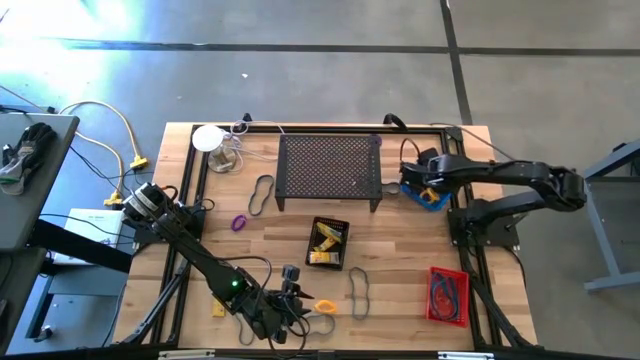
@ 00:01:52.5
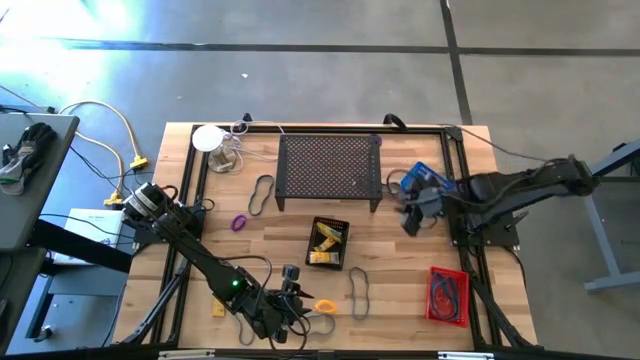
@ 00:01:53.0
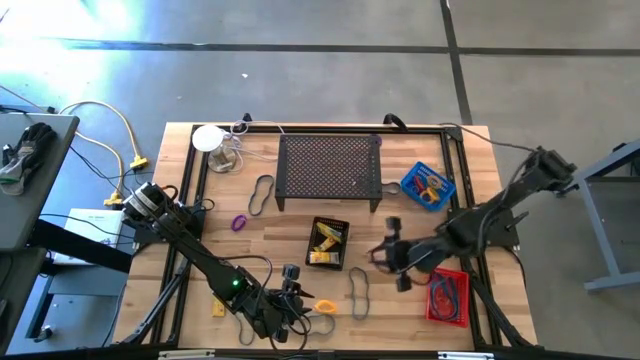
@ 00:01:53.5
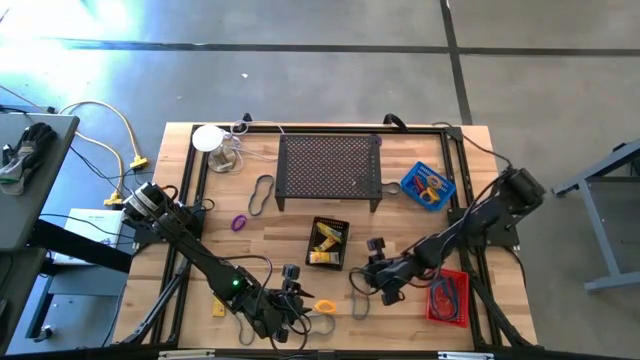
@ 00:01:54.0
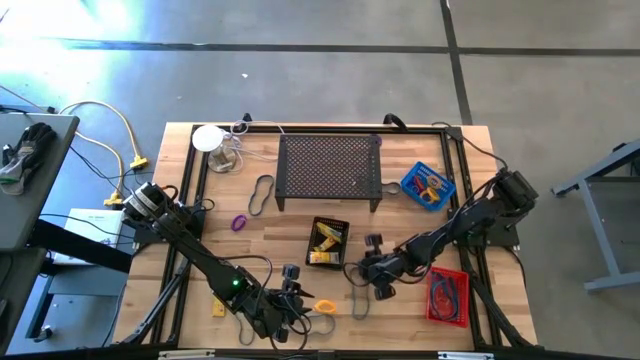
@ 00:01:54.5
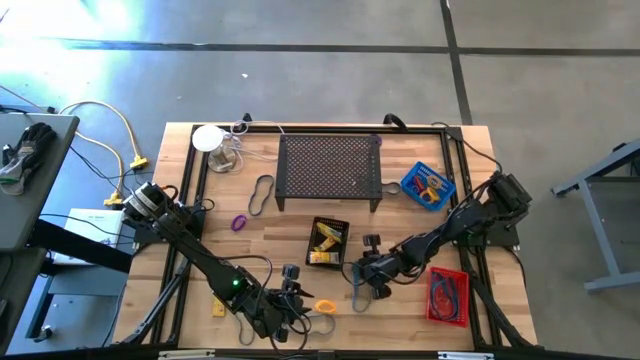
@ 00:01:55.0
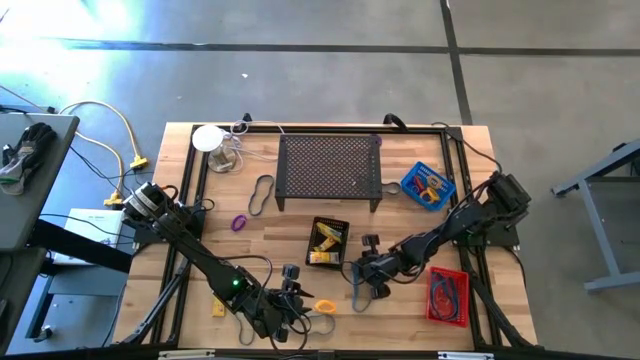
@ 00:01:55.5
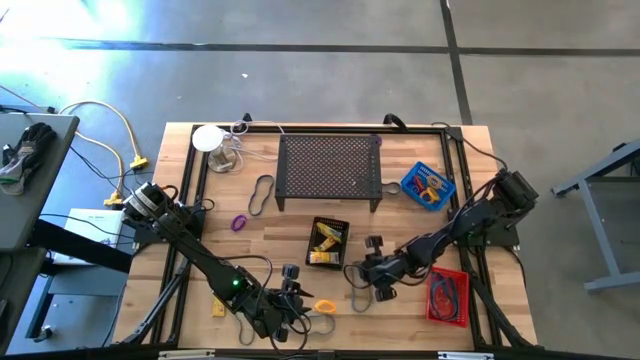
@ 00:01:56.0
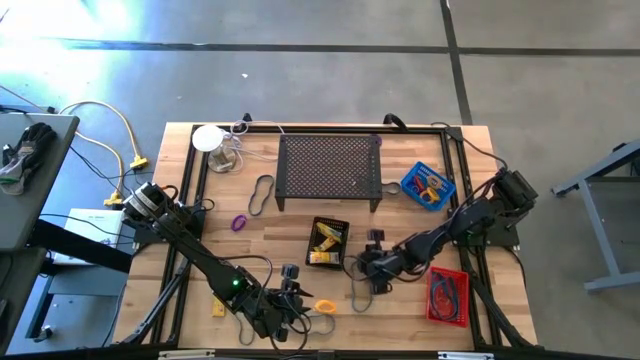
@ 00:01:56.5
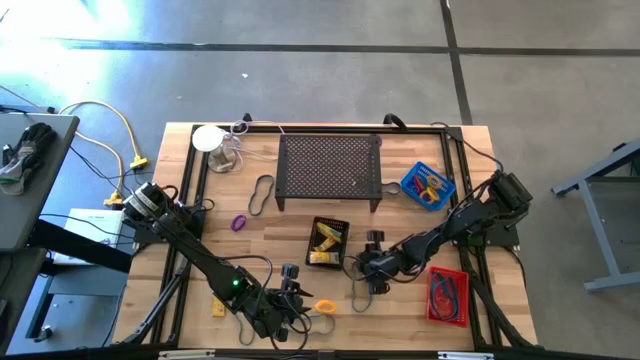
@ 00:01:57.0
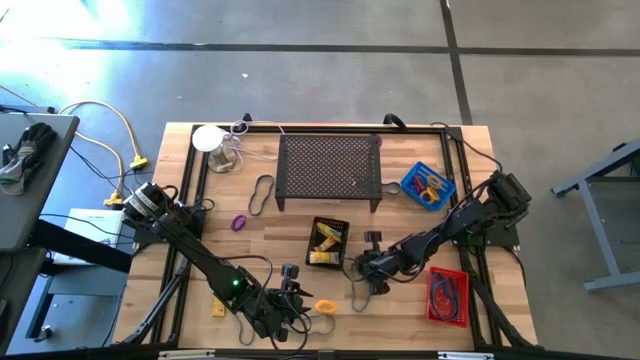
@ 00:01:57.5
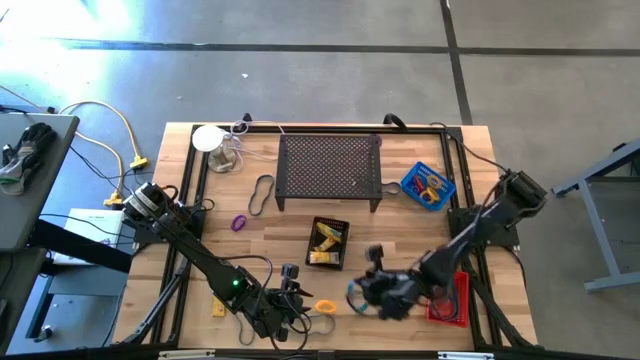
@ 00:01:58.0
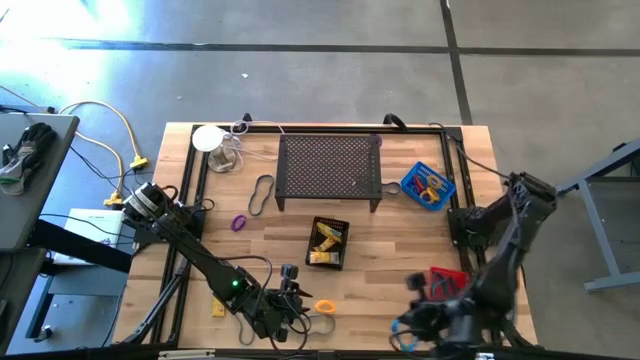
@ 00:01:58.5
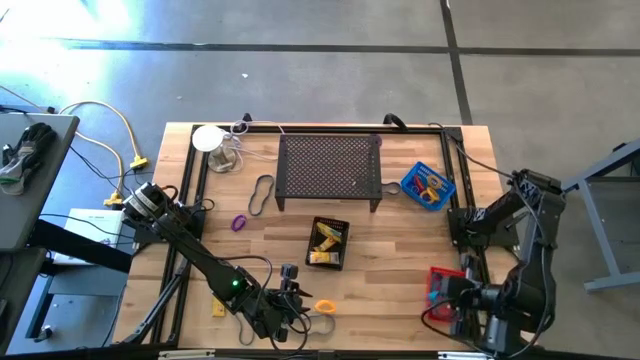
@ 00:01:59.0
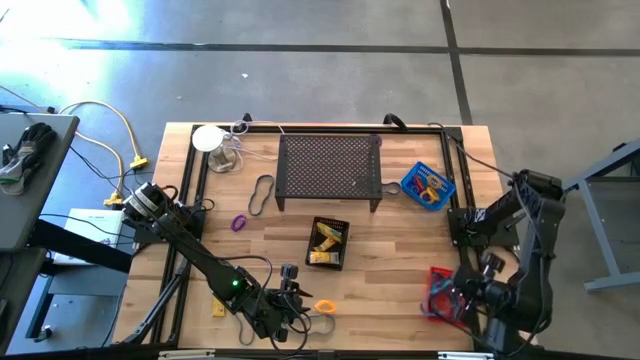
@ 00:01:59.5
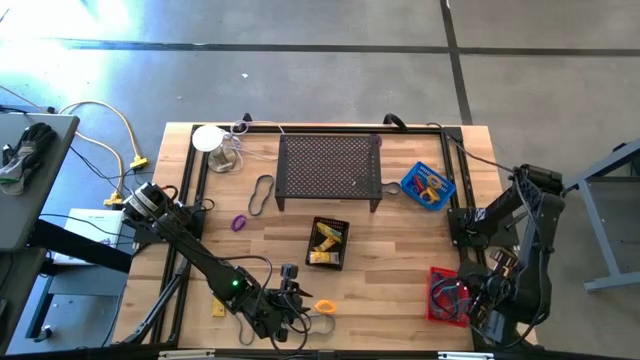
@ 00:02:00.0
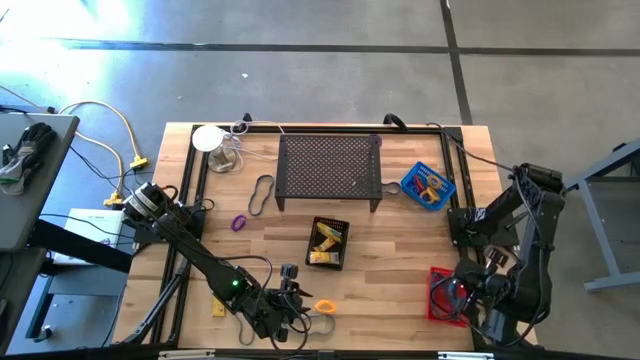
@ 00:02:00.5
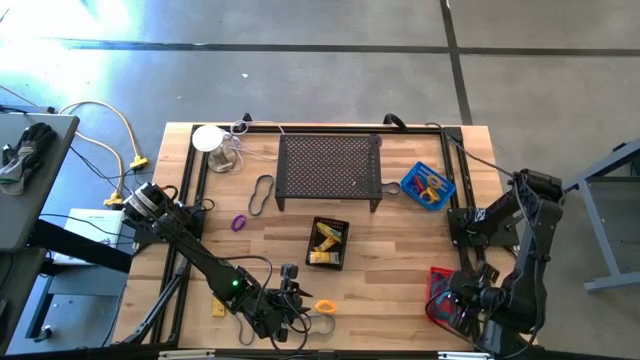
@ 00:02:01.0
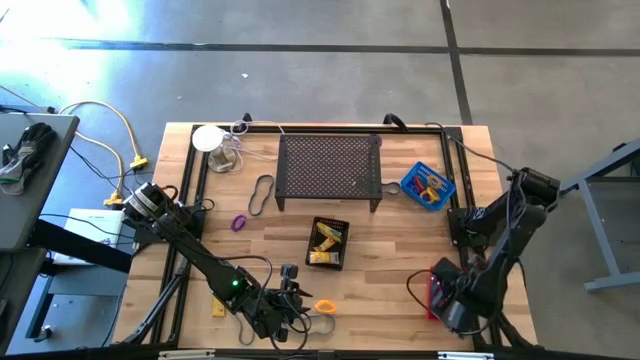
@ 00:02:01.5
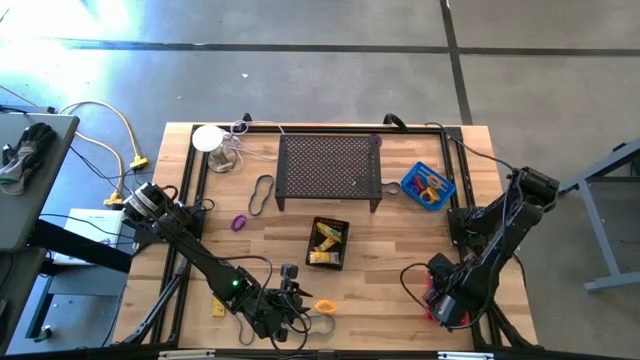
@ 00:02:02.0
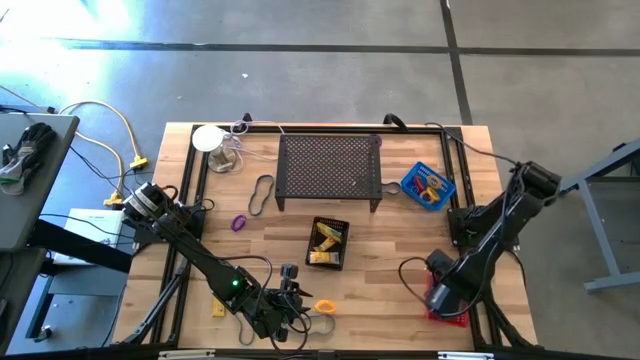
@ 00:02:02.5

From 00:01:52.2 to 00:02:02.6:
Task: Pick & Place Office Desk Supplies
Put the blue rubber band into the orange bin

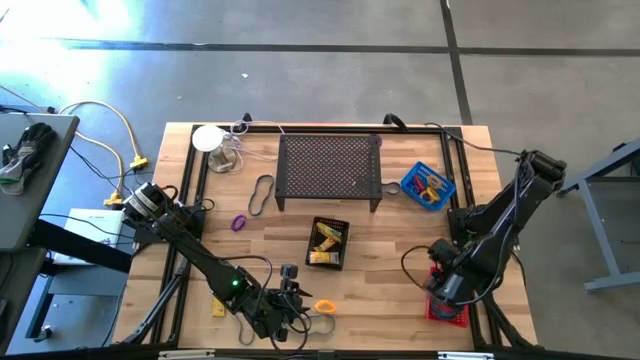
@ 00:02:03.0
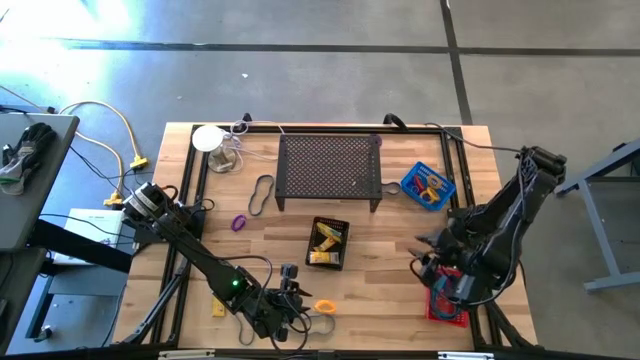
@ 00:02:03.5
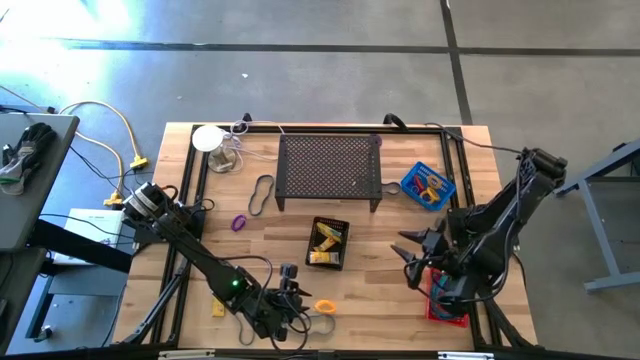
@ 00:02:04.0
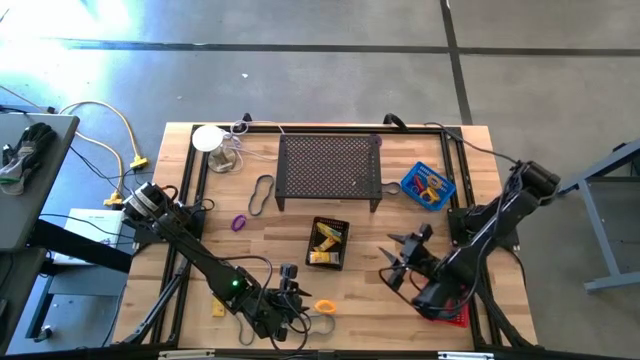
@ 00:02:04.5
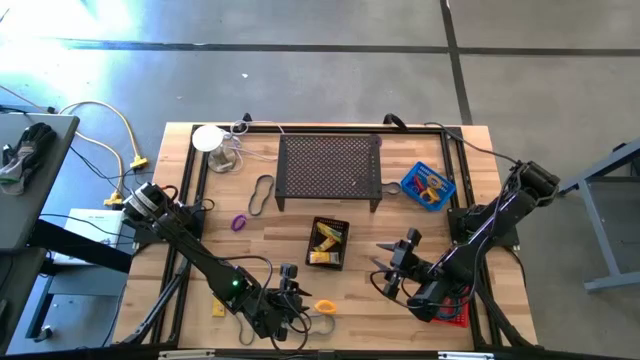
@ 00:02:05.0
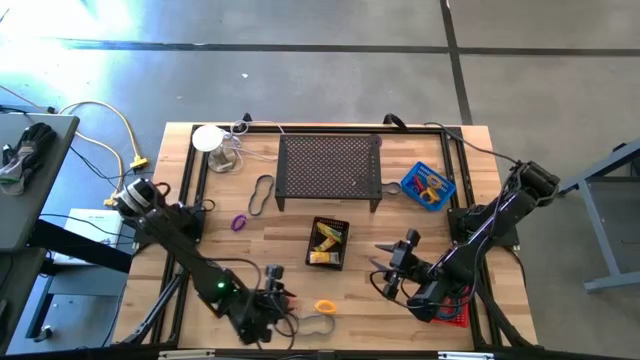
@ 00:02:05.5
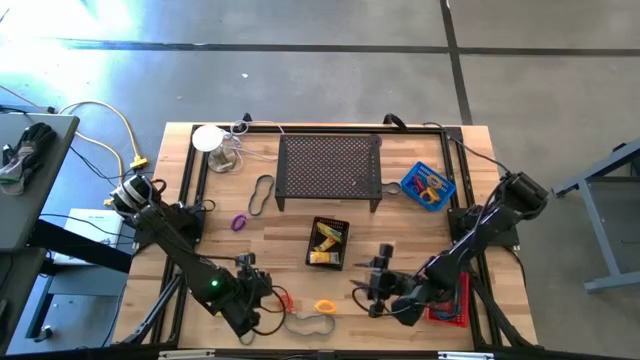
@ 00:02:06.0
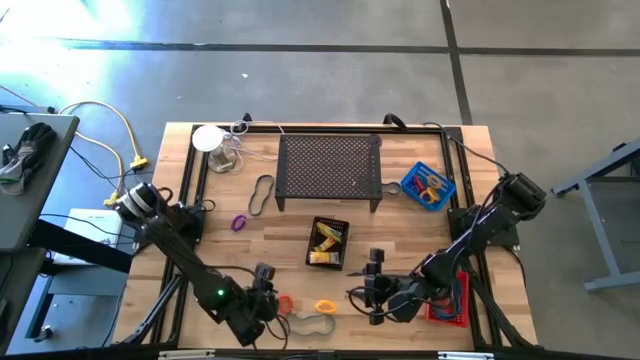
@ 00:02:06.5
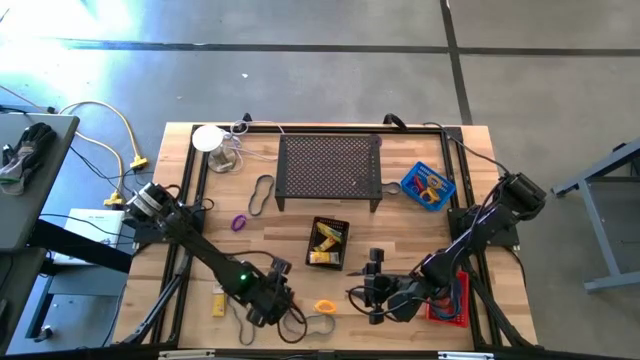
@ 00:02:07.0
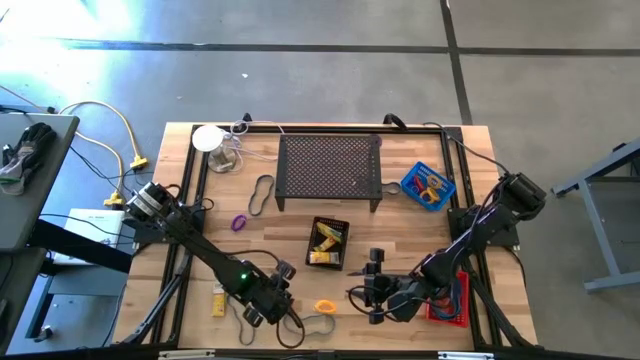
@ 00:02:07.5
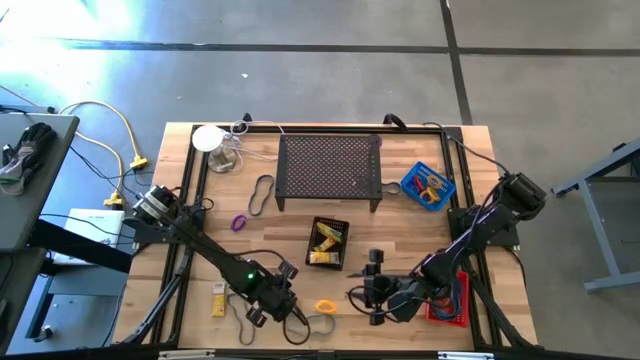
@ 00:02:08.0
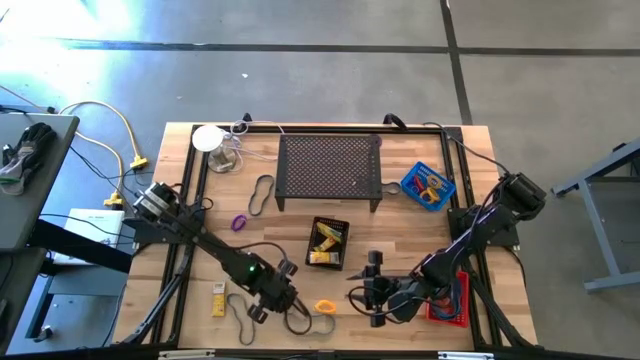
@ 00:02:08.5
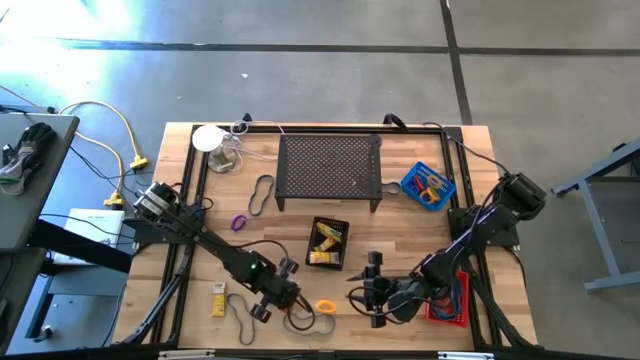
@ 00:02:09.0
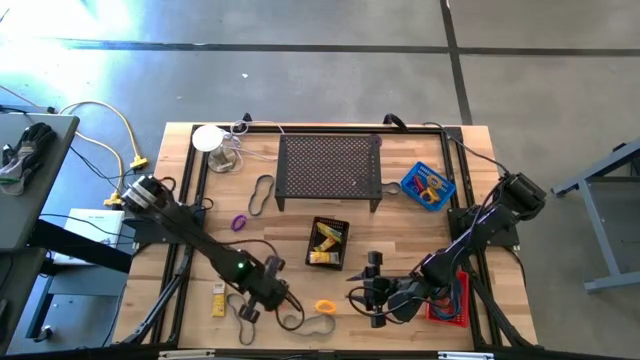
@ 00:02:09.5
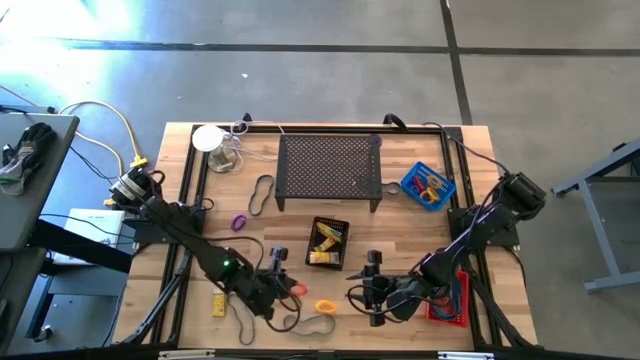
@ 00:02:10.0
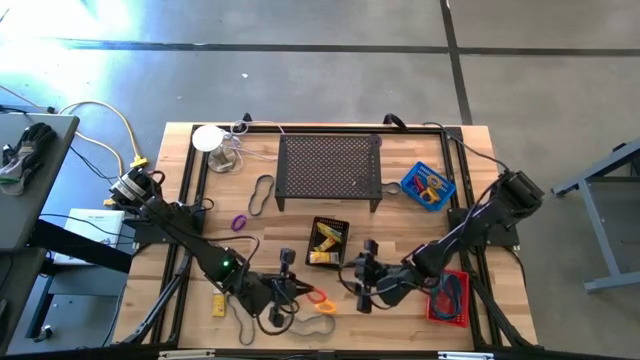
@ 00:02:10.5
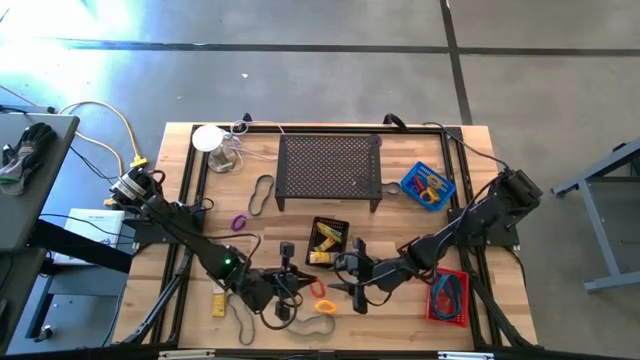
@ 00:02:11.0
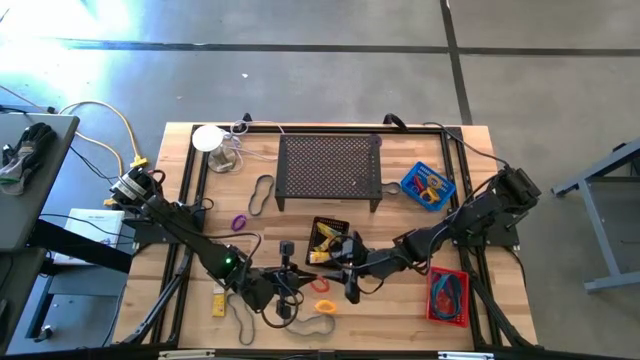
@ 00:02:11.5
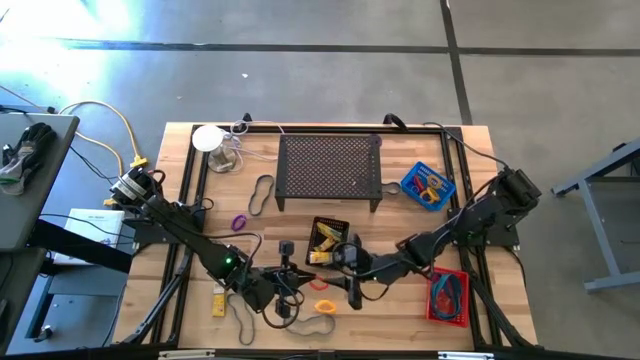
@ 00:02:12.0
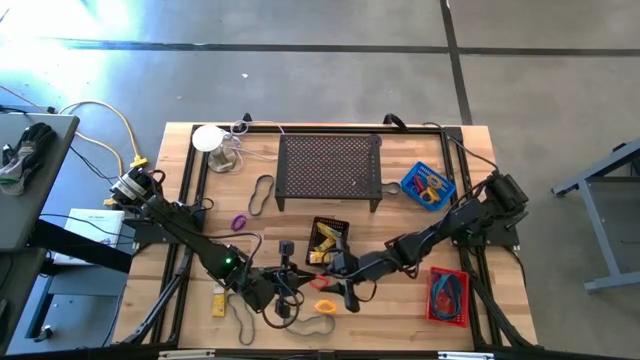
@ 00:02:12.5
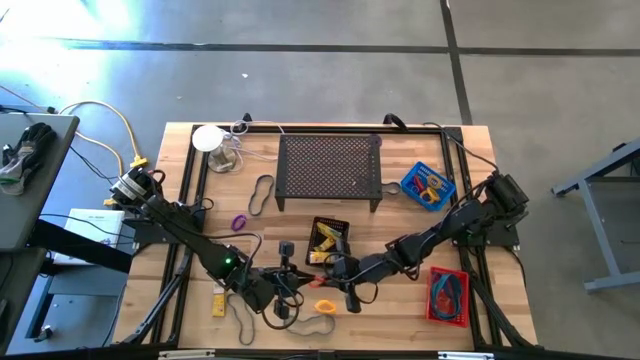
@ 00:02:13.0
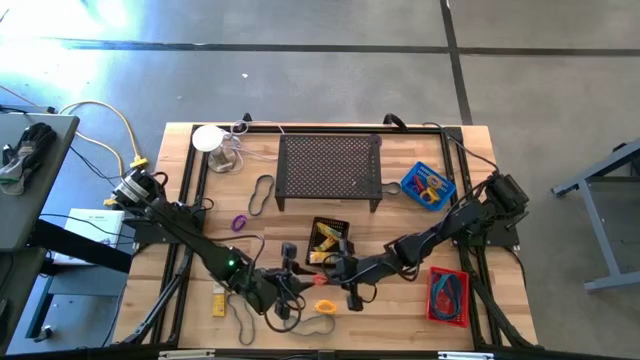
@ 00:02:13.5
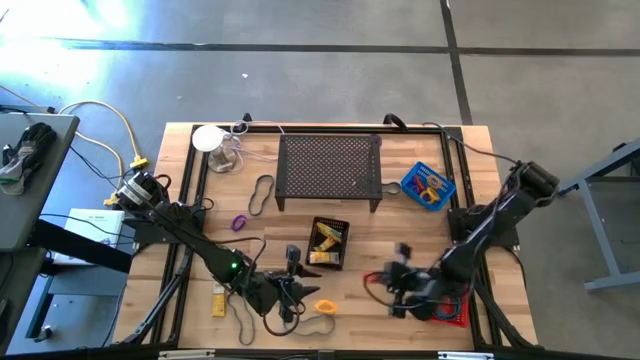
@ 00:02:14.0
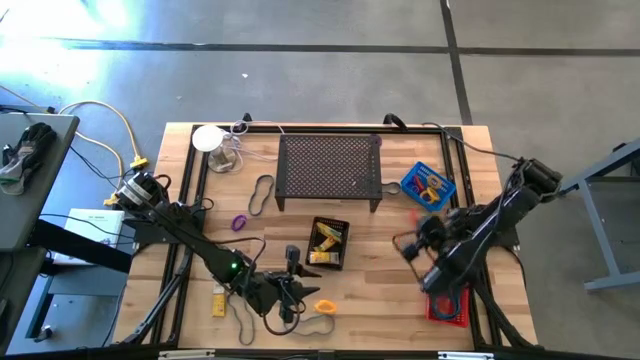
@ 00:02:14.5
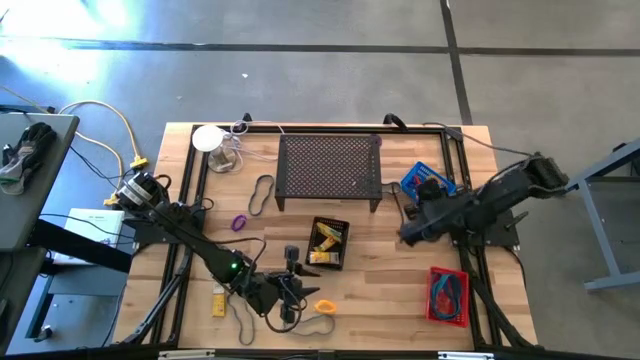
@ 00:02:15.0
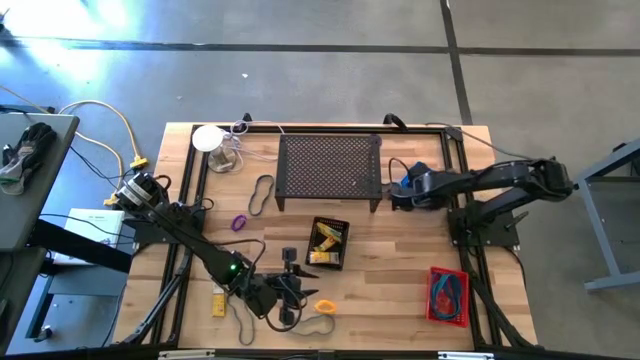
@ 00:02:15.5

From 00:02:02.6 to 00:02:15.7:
Put the orange spring keychain into the blue bin
